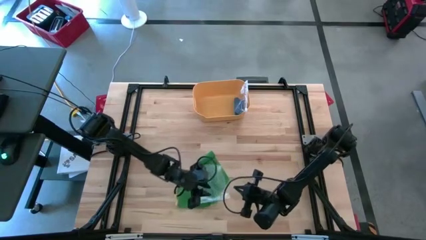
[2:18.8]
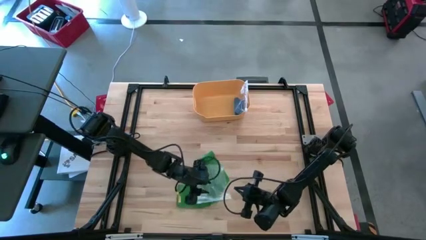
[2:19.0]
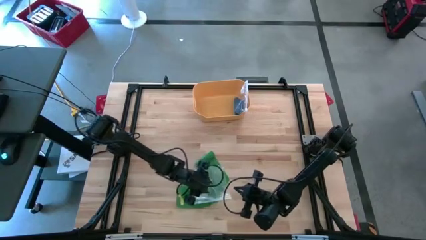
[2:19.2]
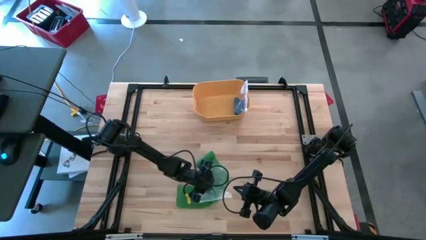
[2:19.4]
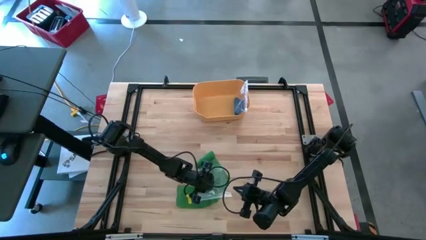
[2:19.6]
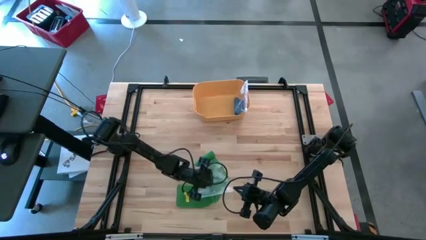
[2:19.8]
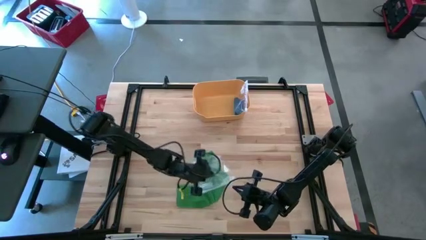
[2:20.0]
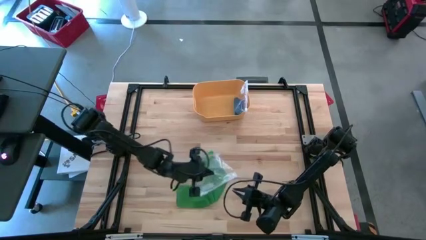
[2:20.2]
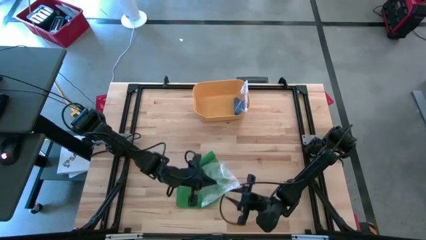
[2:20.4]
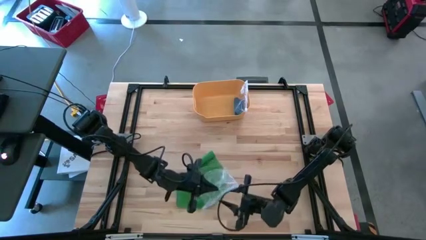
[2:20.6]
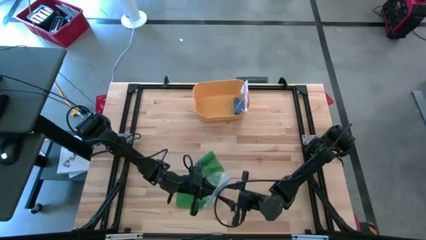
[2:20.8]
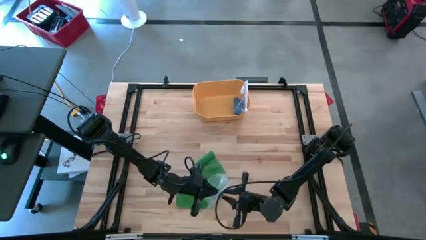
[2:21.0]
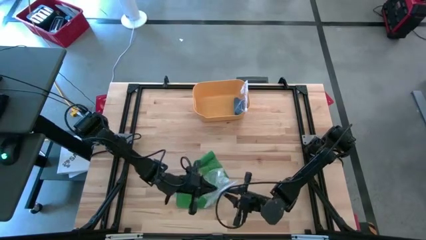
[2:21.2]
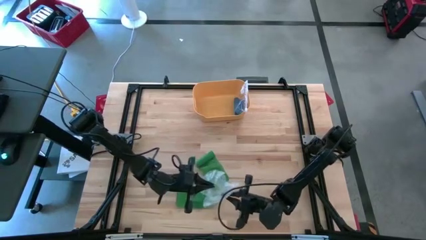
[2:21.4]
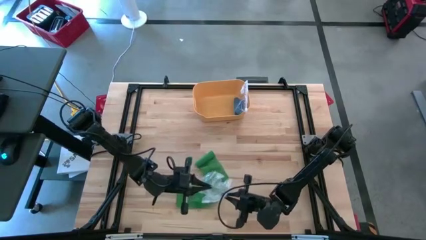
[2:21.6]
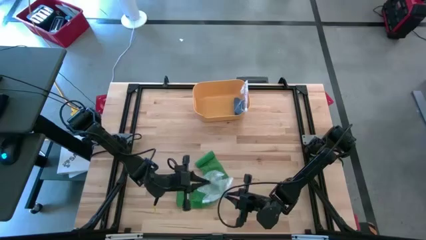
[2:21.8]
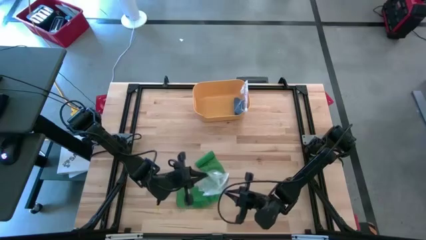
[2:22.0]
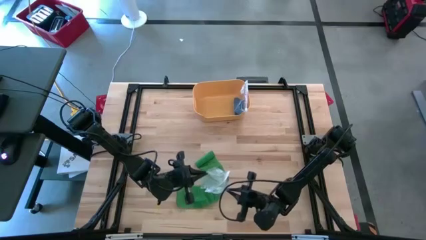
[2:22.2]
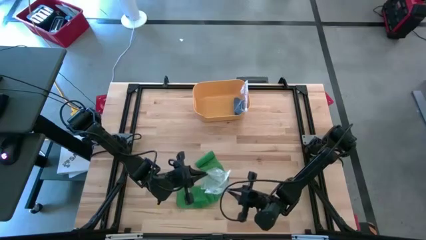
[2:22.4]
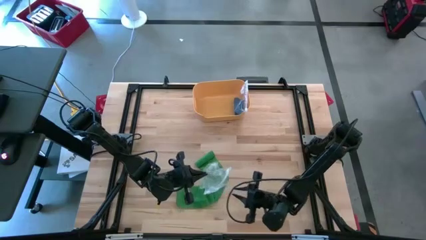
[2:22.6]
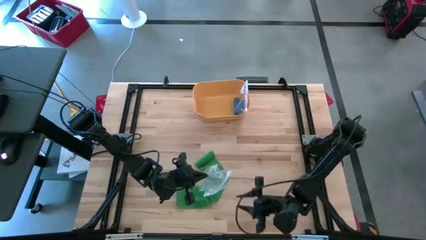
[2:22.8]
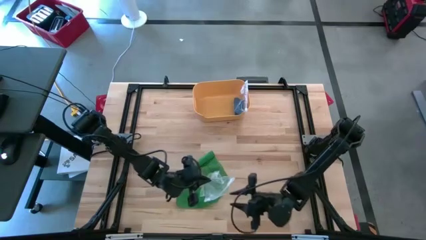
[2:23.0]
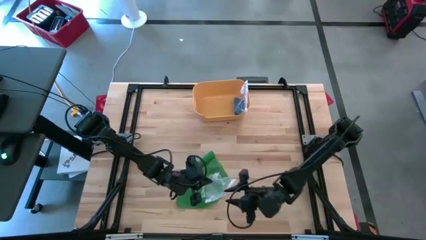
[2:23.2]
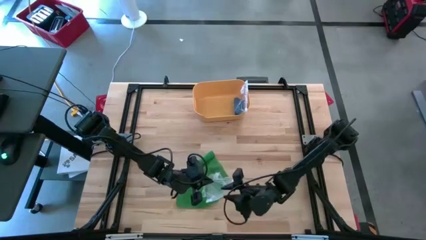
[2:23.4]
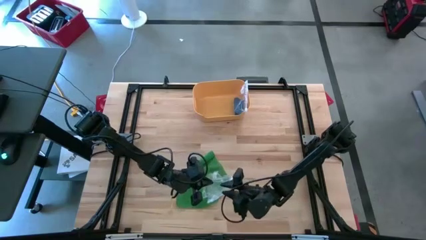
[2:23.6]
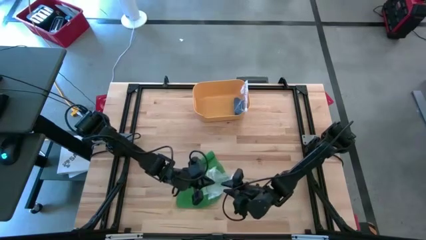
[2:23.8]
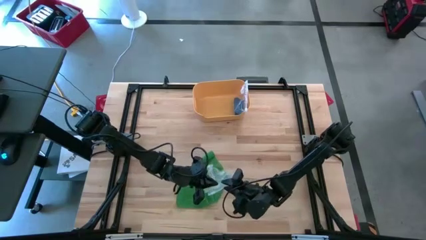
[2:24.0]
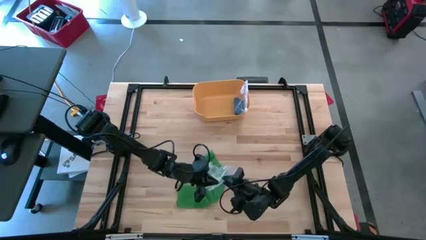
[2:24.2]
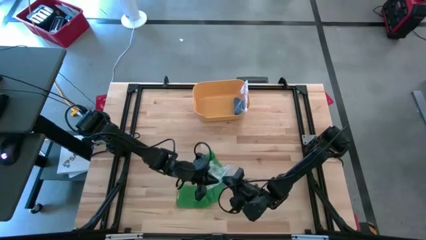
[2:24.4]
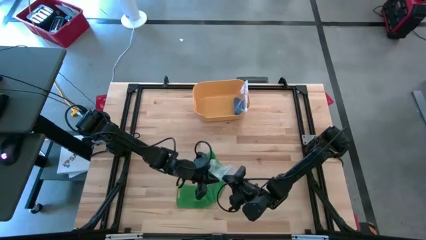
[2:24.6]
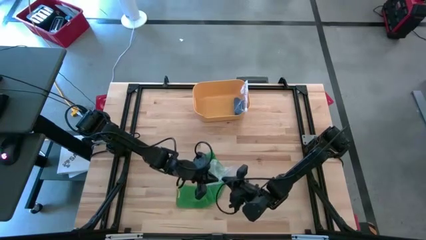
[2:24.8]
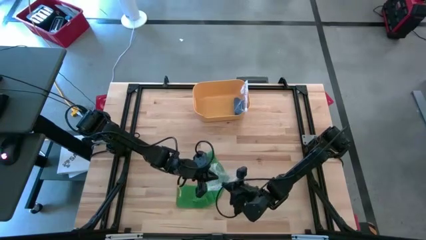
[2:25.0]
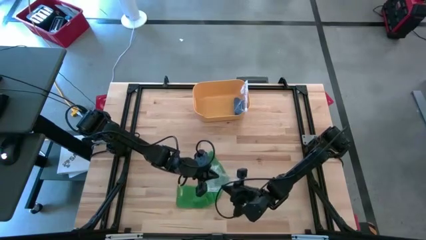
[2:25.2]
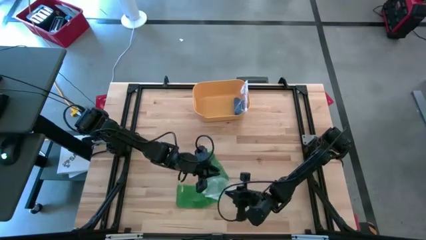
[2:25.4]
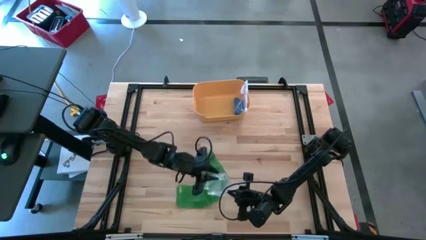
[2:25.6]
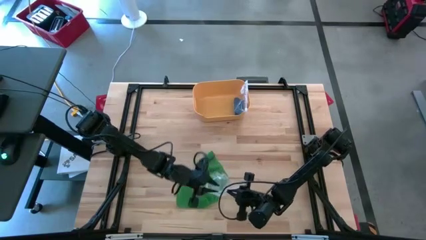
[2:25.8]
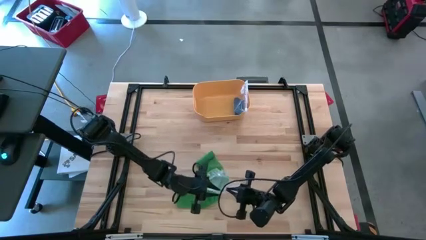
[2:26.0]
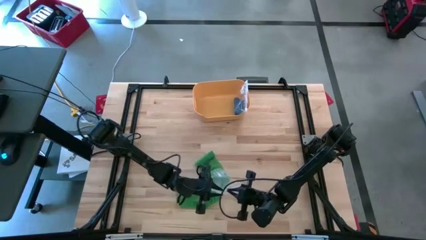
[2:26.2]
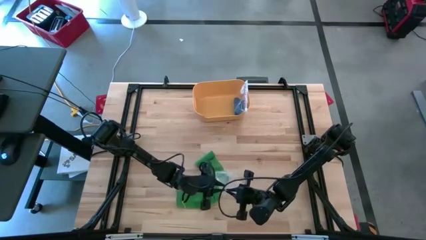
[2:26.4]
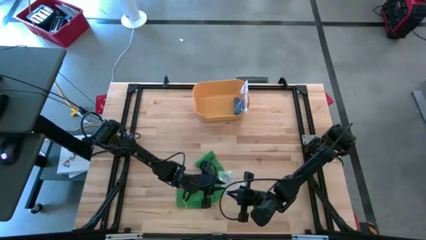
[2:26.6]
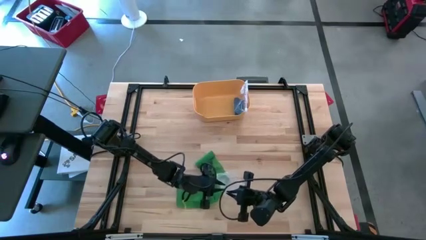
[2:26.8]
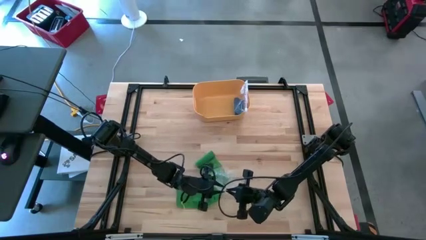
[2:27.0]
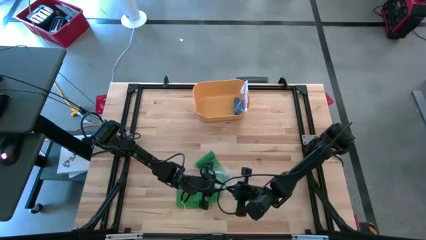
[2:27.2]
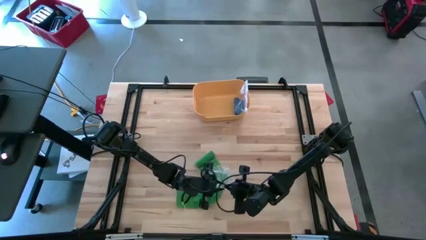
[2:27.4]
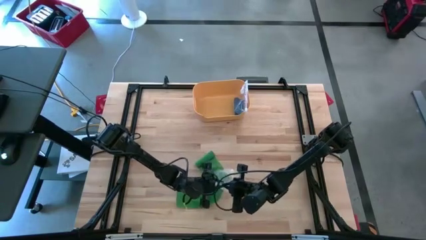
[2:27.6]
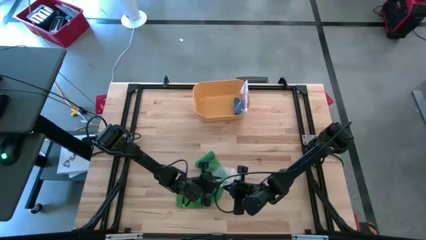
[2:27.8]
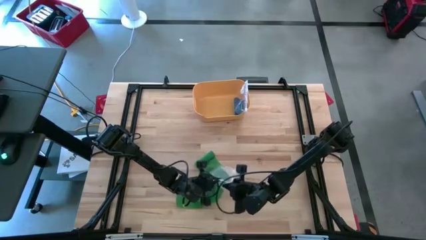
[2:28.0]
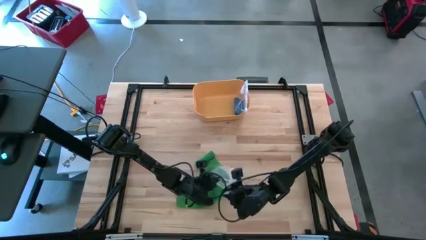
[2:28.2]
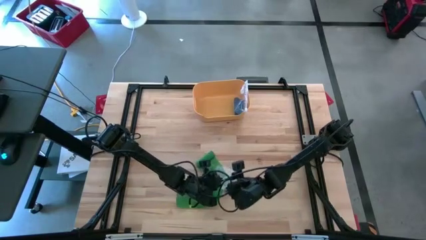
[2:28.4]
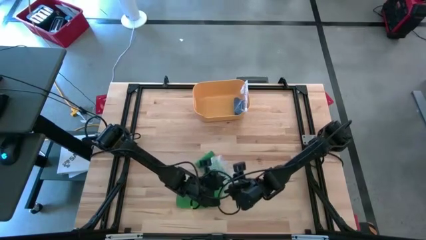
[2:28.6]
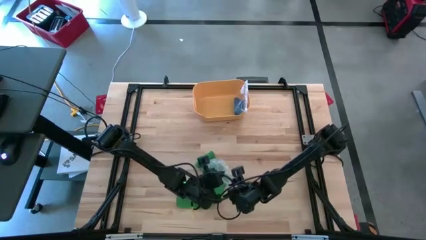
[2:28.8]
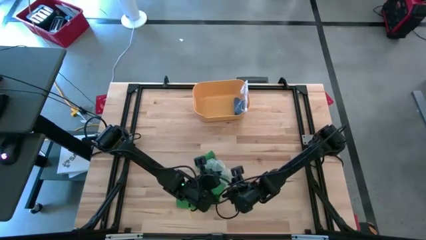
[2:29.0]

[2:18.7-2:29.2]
Task: Roll bandage
Open the transparent zip bag

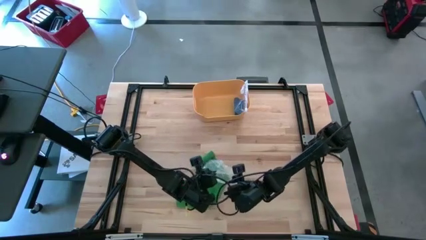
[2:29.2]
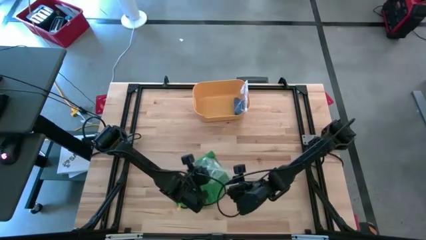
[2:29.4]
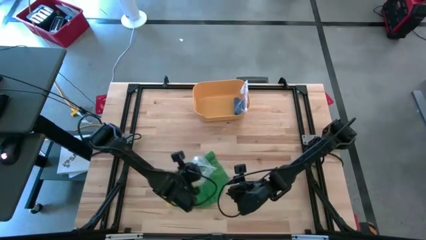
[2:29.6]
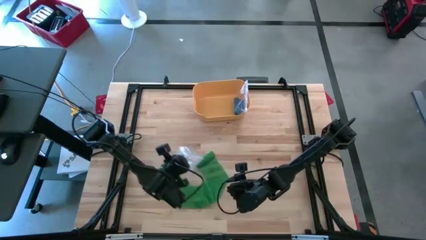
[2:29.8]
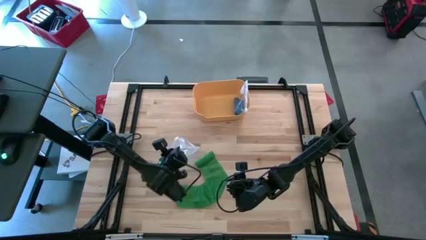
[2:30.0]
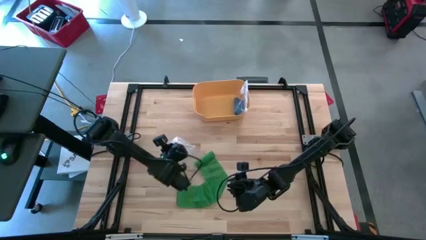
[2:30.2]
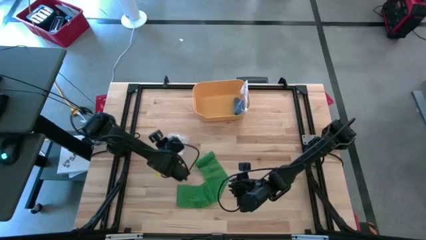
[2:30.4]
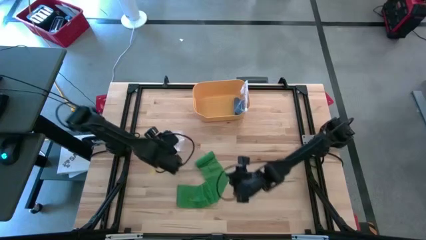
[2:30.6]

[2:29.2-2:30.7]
Put the transparent zip bag on the table

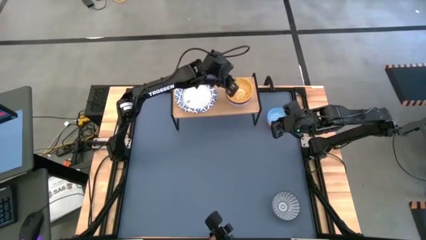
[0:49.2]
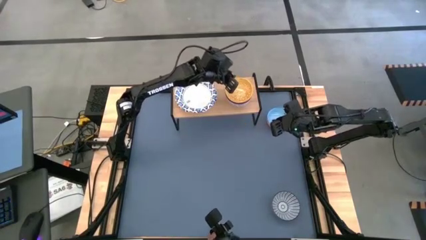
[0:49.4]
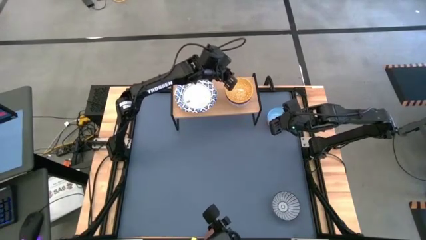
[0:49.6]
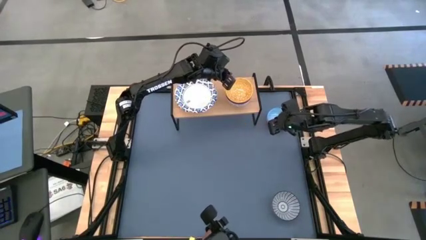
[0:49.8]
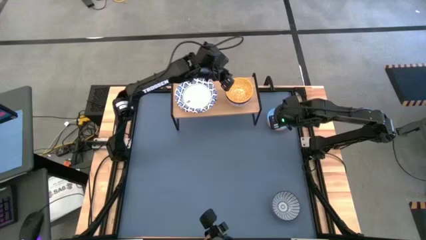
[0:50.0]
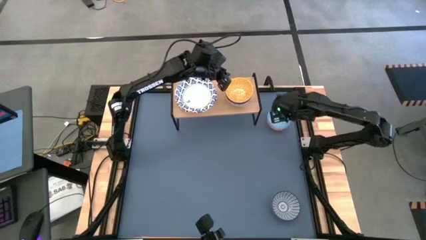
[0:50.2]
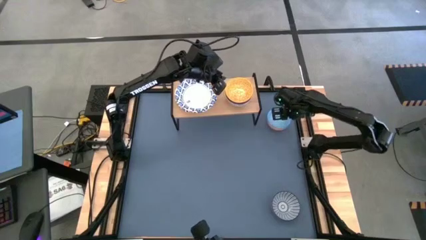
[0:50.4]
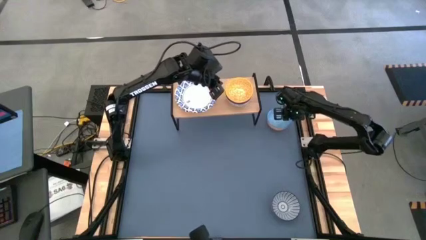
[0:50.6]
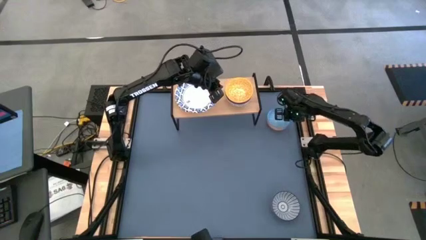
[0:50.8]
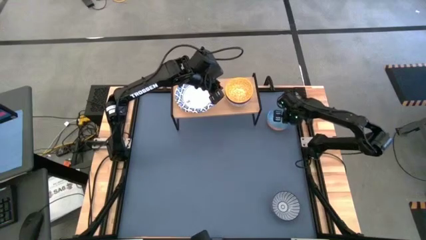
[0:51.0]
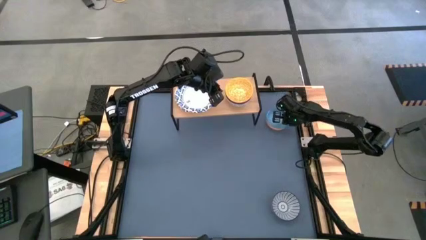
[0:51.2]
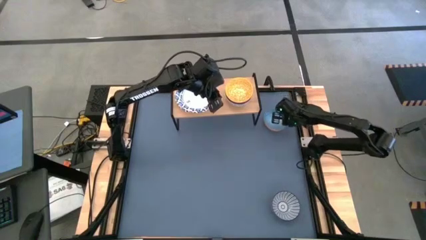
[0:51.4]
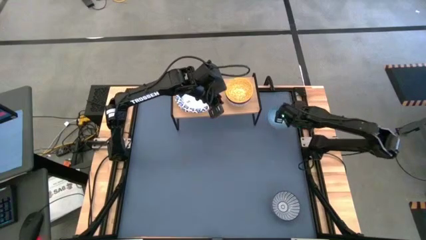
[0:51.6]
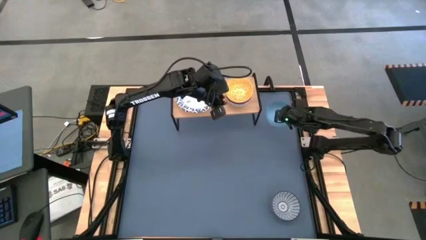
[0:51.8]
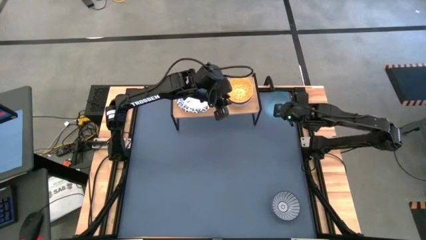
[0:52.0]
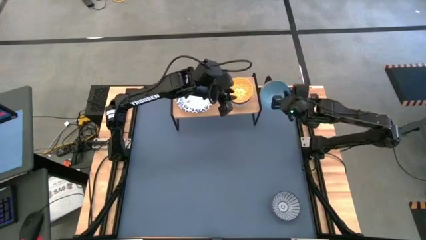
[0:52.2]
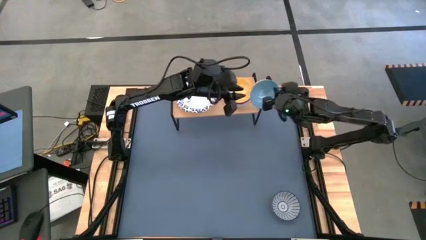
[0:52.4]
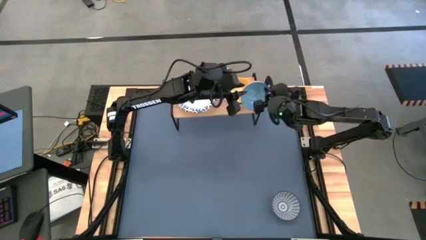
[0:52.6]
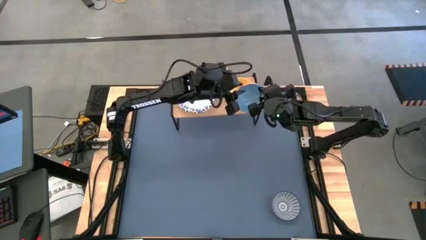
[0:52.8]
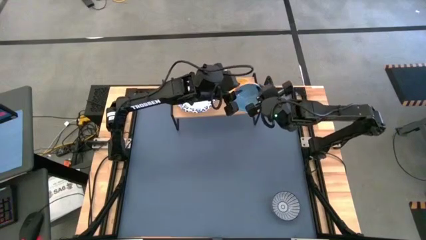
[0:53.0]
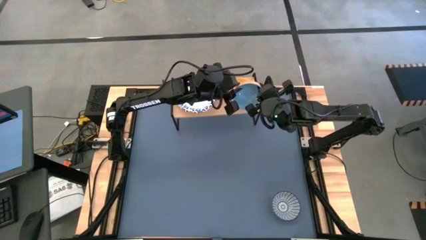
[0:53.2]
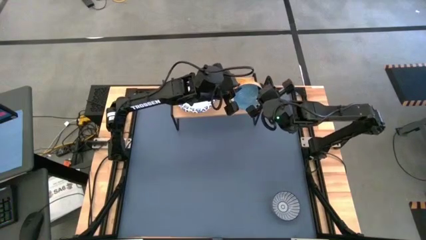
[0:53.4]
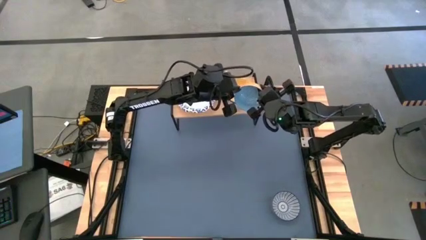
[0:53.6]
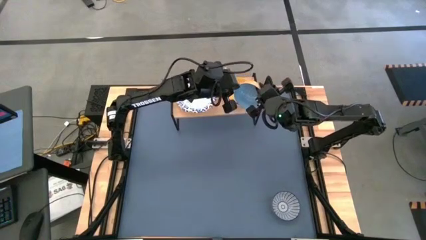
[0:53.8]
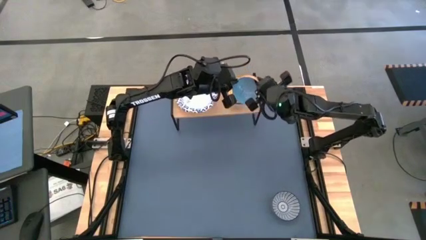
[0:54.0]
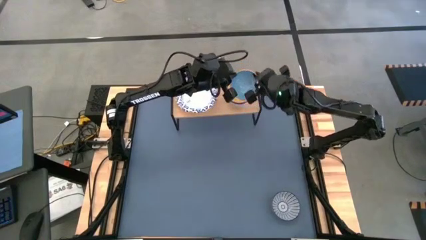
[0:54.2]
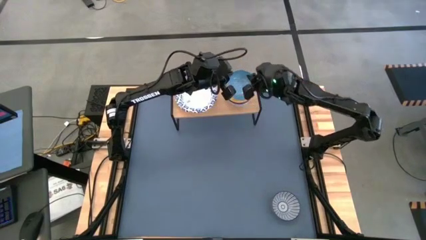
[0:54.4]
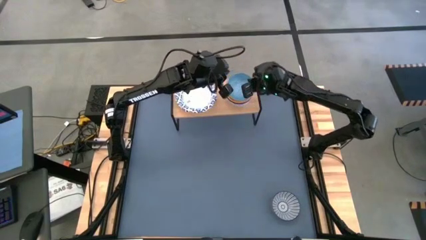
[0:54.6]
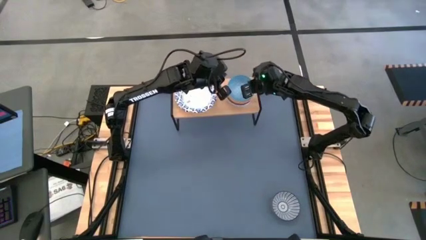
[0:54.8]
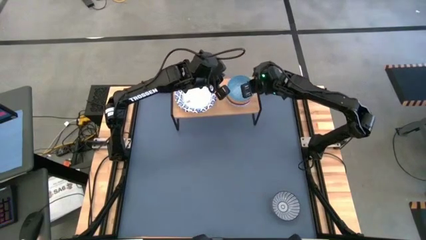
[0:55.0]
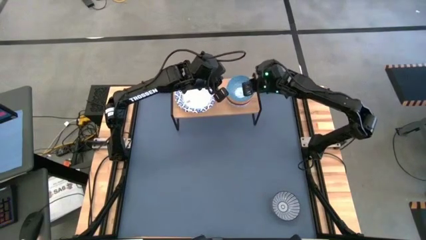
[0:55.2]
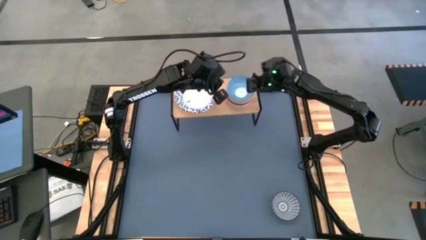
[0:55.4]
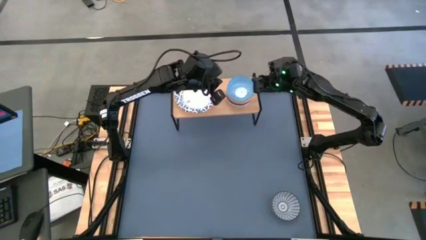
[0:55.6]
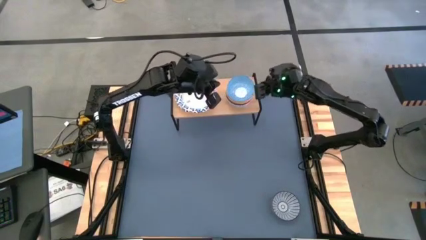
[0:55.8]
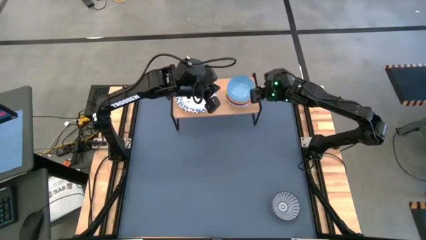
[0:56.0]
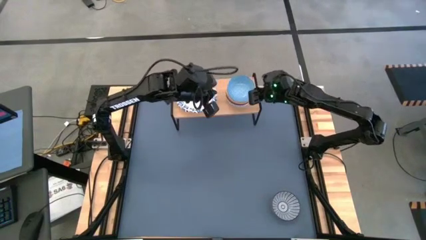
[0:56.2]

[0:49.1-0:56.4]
Task: Place and stack bowls onto a shelf
Stack the light blue bowl on top of the yellow bowl on the shelf
